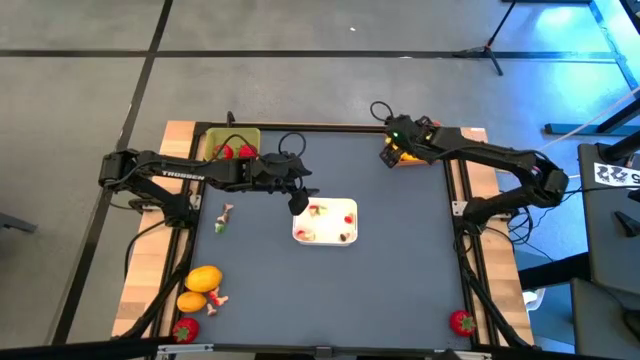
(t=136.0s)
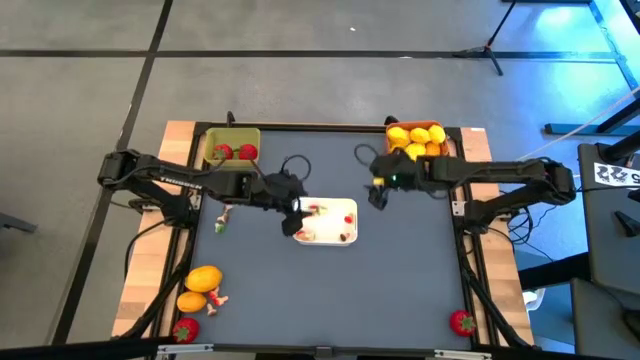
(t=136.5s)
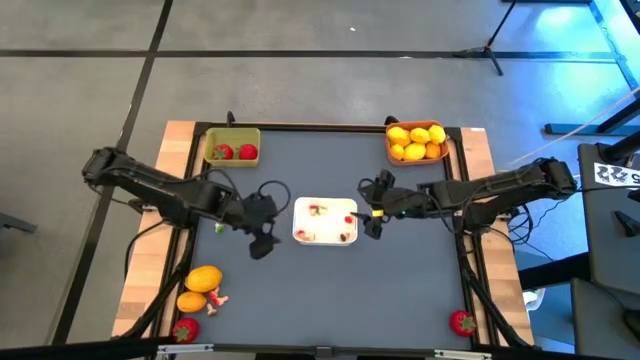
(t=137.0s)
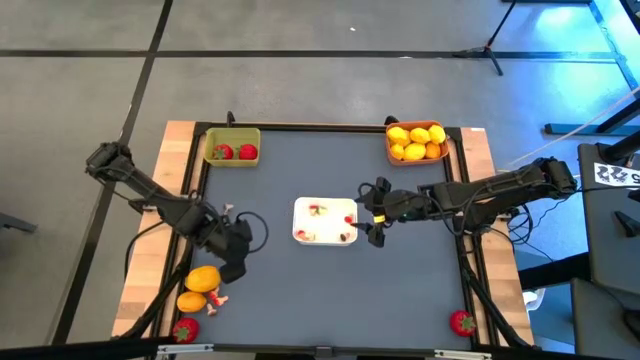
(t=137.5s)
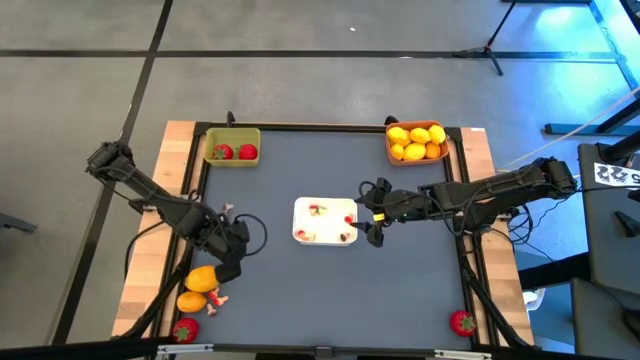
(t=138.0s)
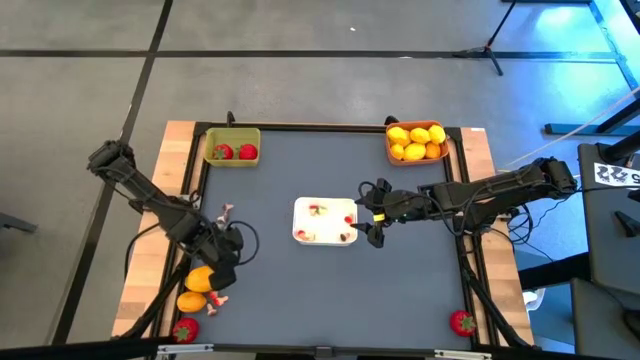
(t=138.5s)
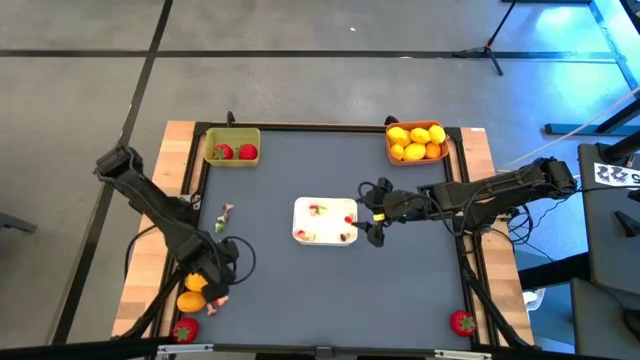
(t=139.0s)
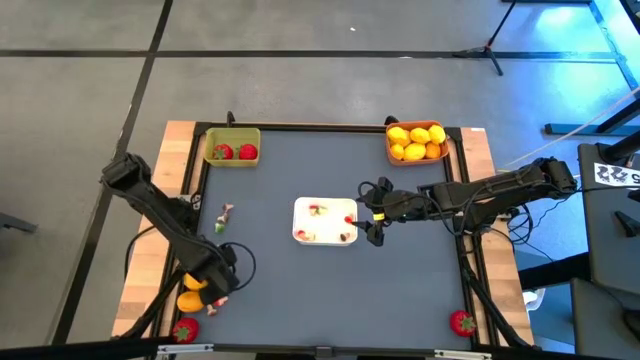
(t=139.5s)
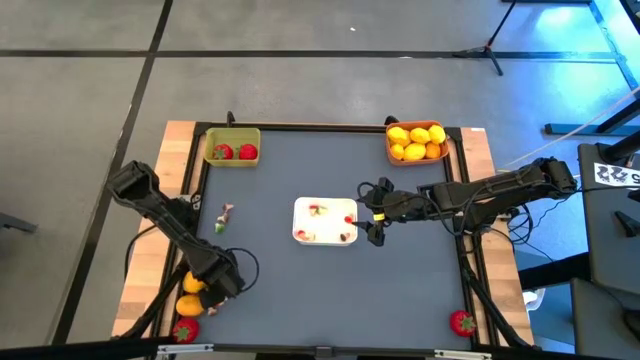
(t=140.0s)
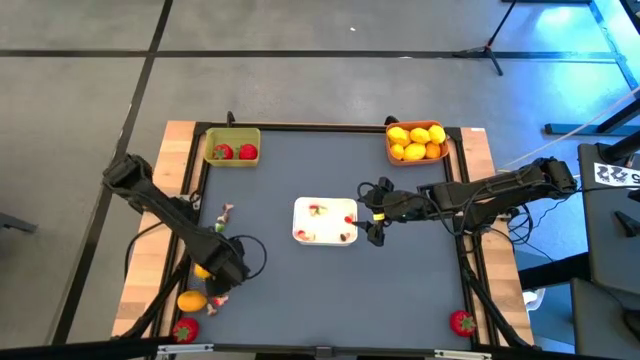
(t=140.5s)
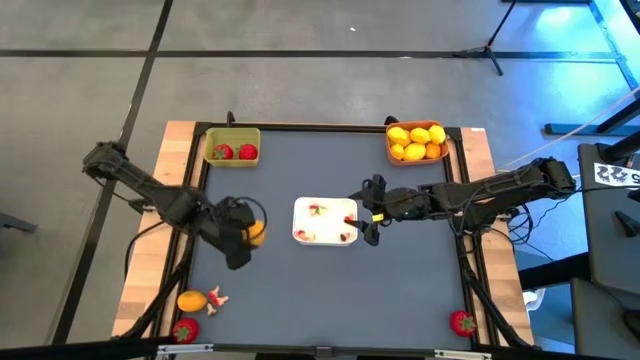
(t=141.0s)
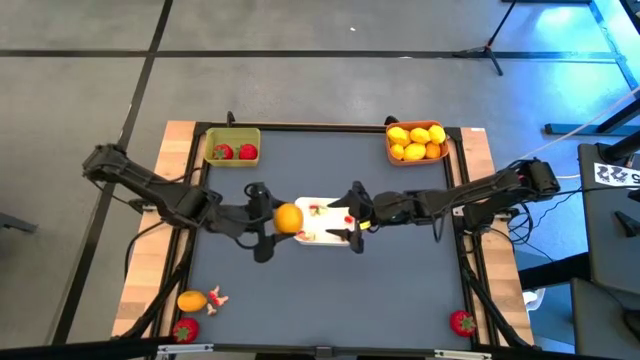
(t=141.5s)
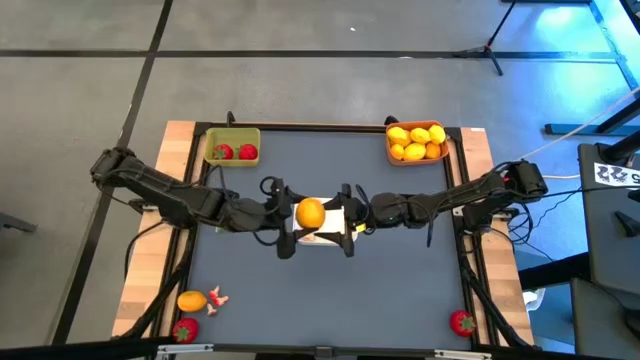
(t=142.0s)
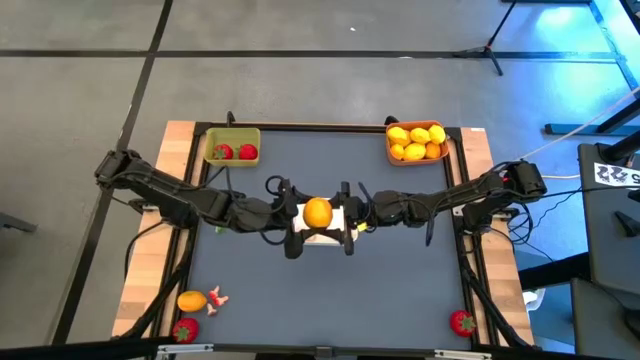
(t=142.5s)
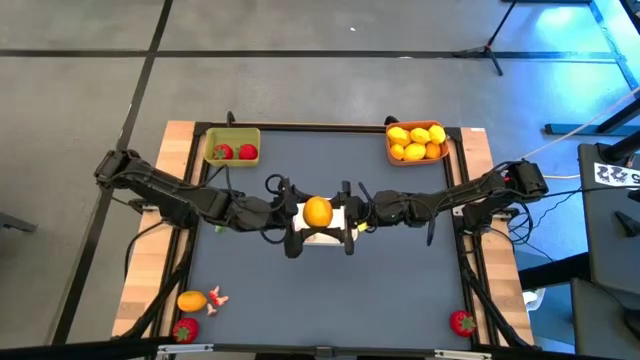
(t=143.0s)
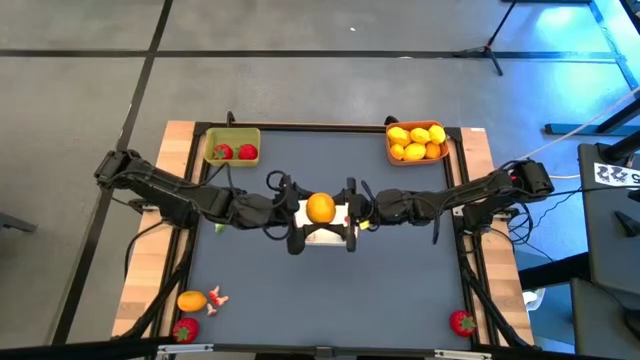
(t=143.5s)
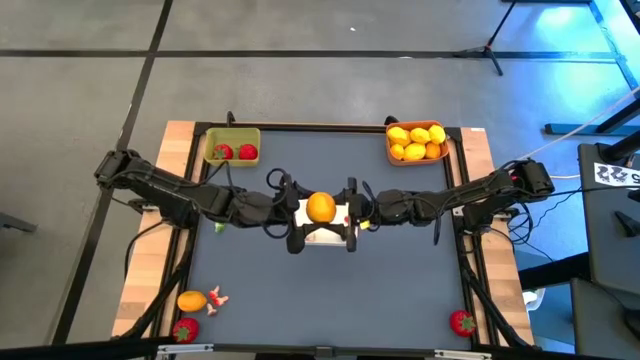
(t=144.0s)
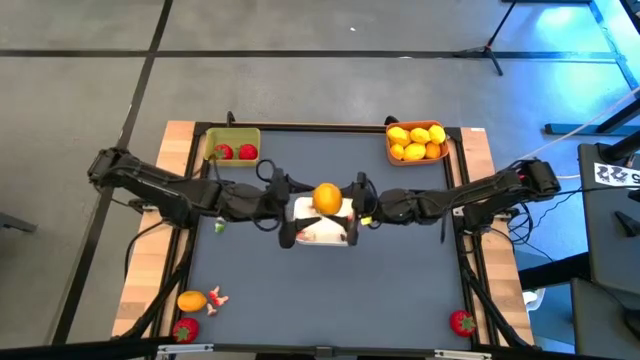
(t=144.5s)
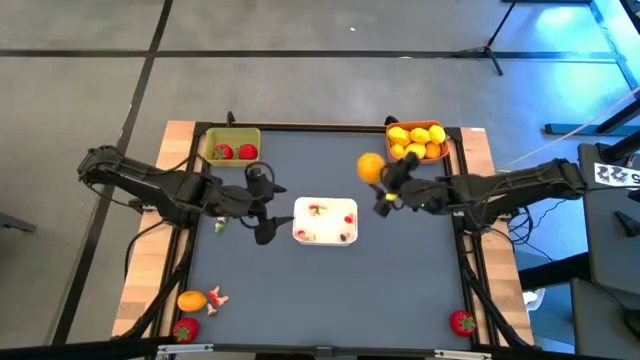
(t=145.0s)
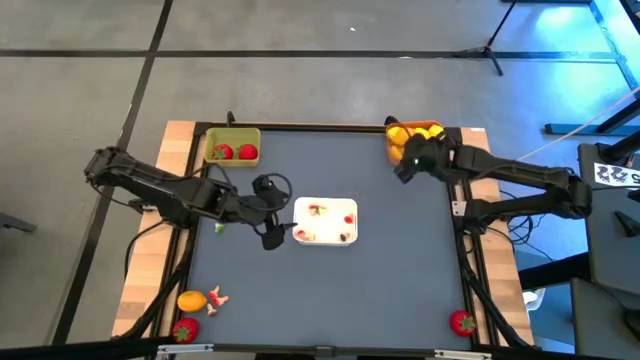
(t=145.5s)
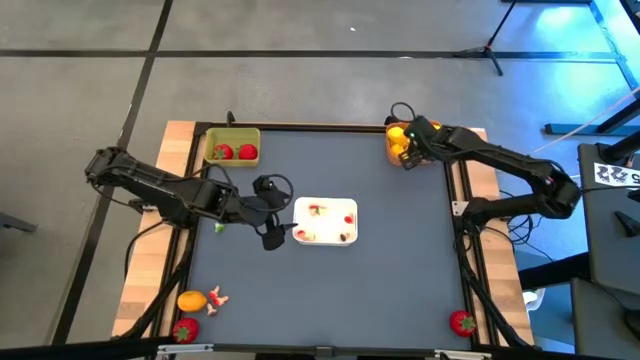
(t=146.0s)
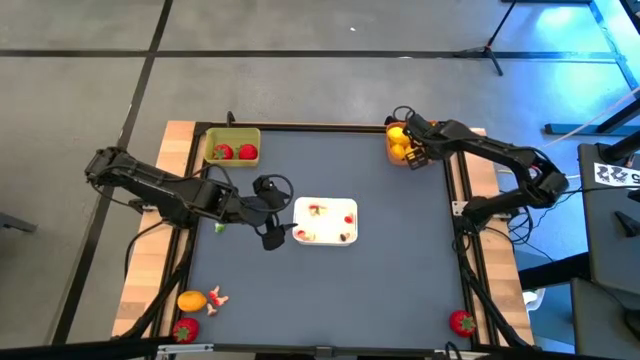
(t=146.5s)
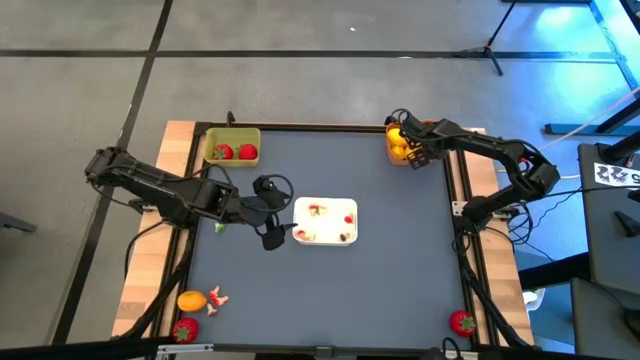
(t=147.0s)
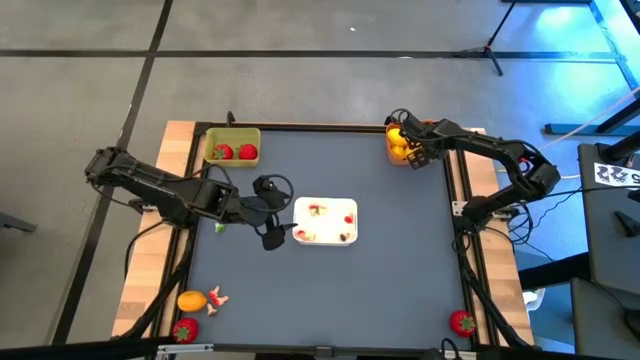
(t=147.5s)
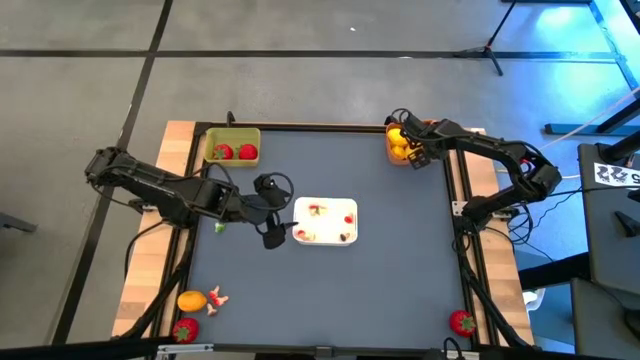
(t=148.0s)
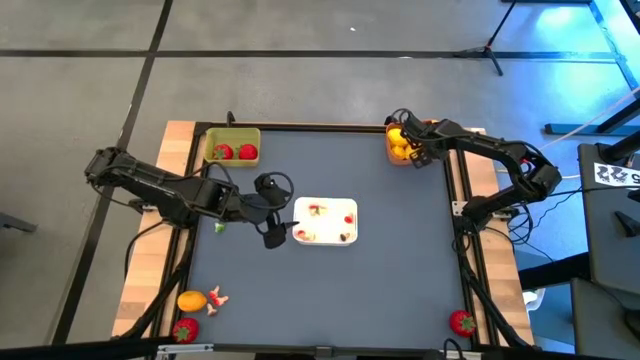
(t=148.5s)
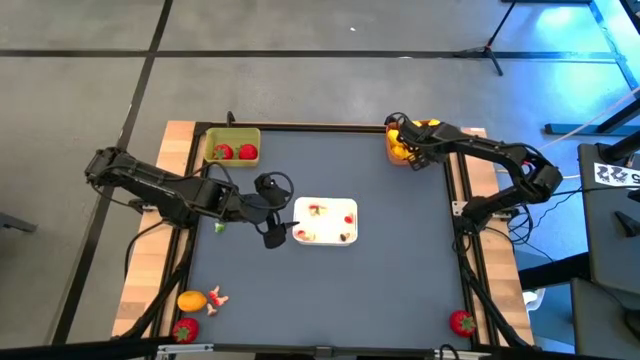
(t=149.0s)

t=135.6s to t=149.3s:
Task: Sort produce into baskets
Put the yellow lemon into the orange bin

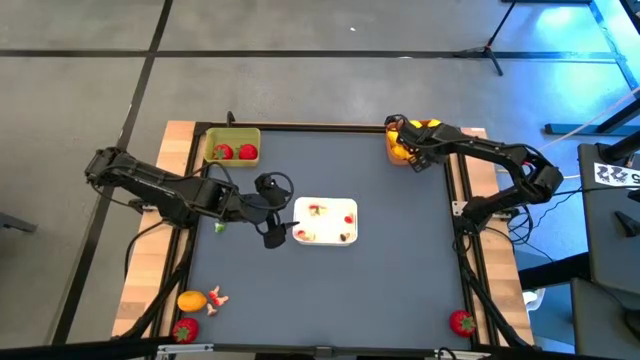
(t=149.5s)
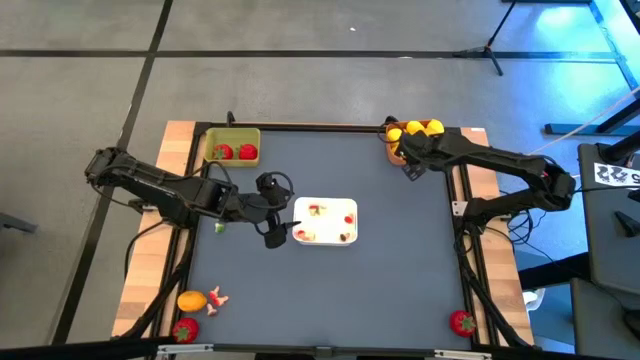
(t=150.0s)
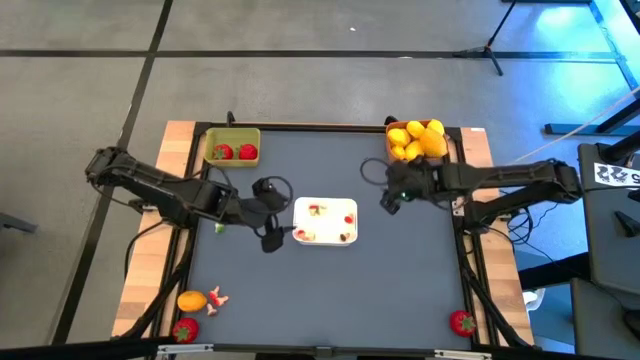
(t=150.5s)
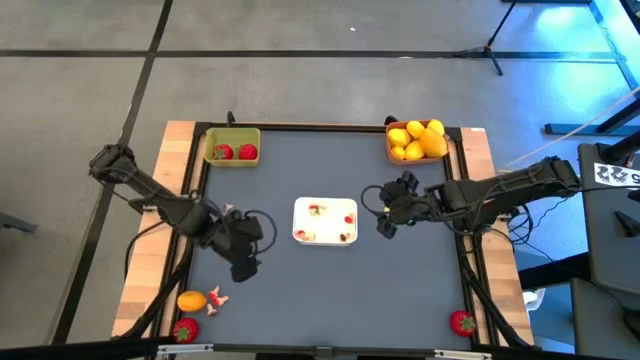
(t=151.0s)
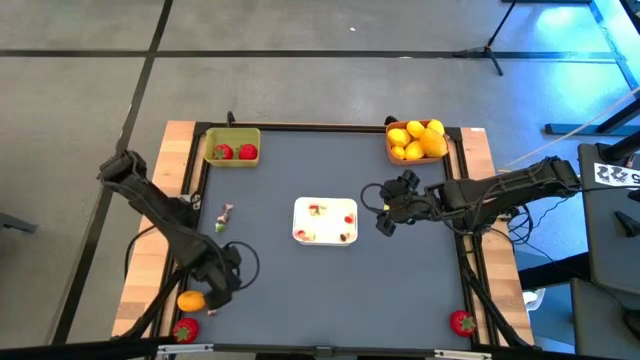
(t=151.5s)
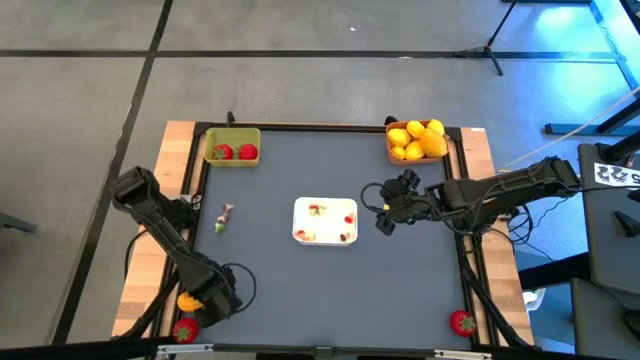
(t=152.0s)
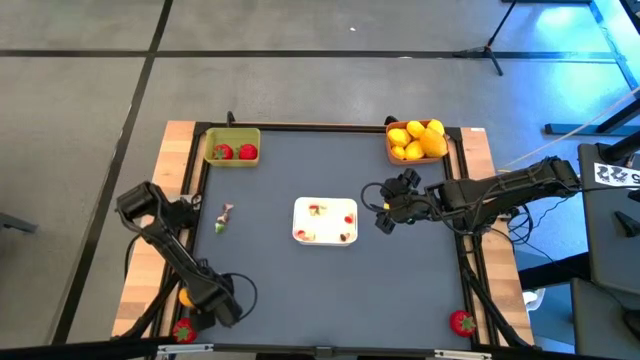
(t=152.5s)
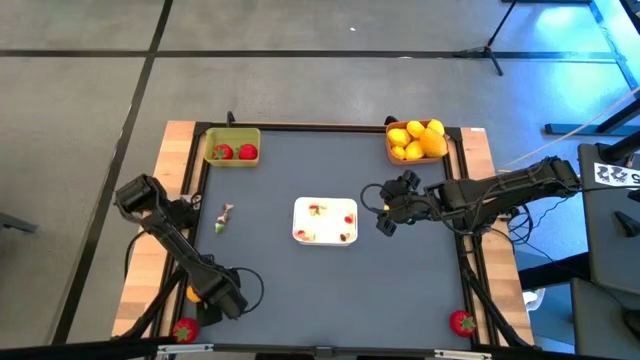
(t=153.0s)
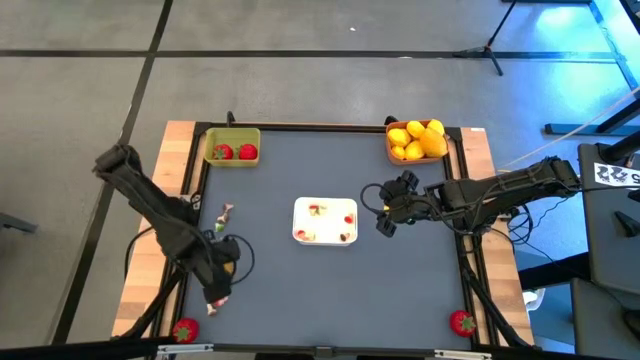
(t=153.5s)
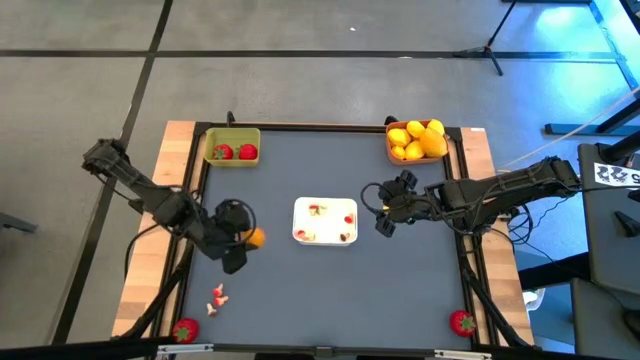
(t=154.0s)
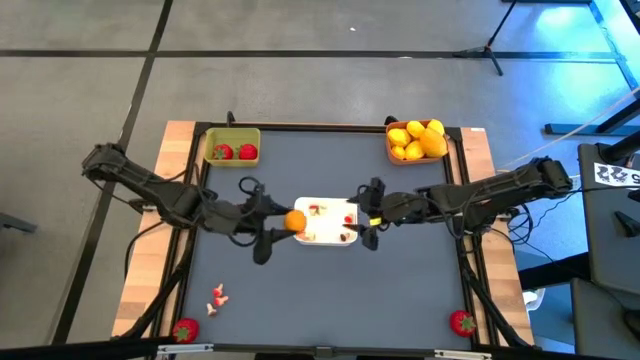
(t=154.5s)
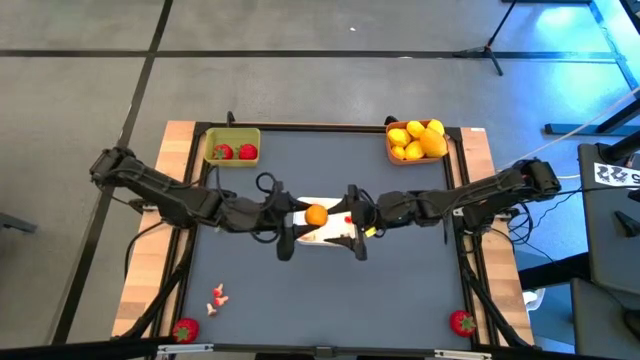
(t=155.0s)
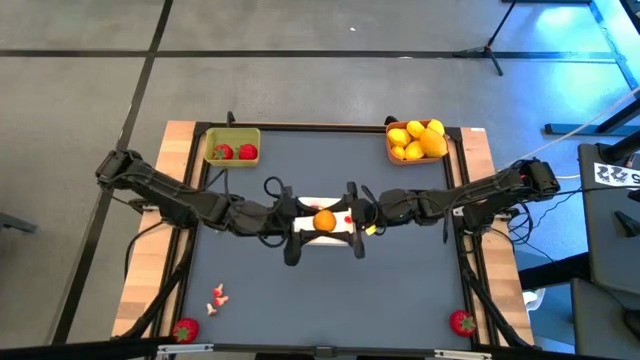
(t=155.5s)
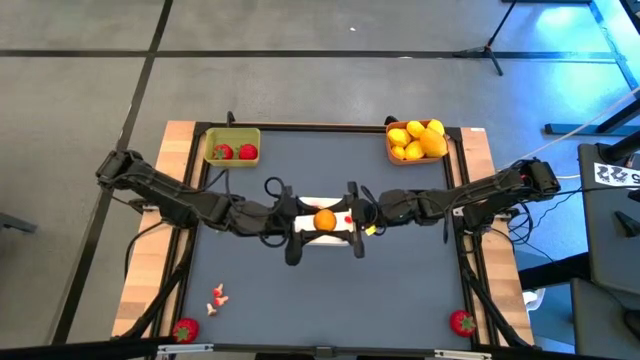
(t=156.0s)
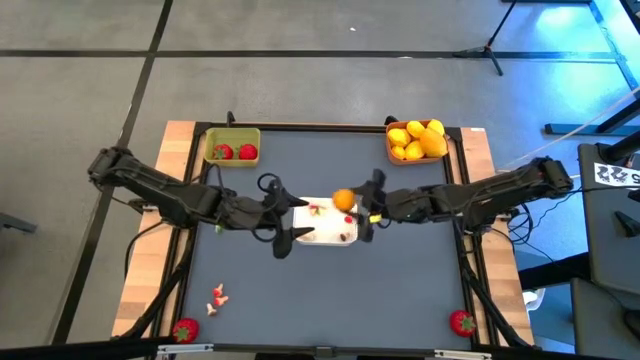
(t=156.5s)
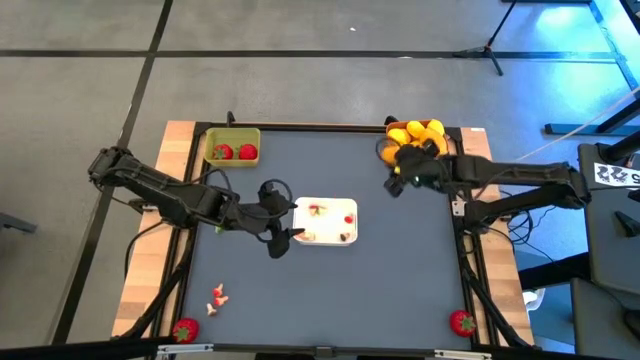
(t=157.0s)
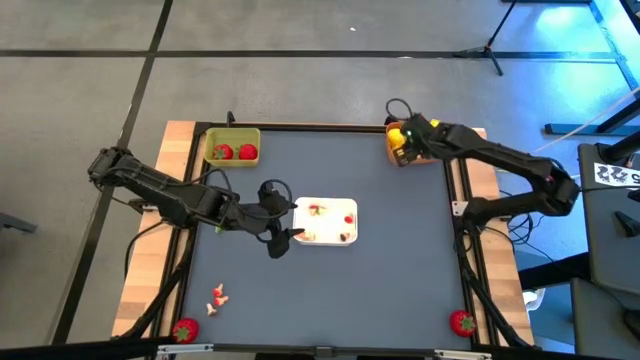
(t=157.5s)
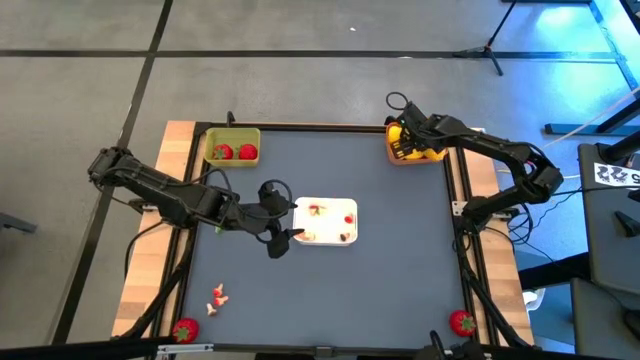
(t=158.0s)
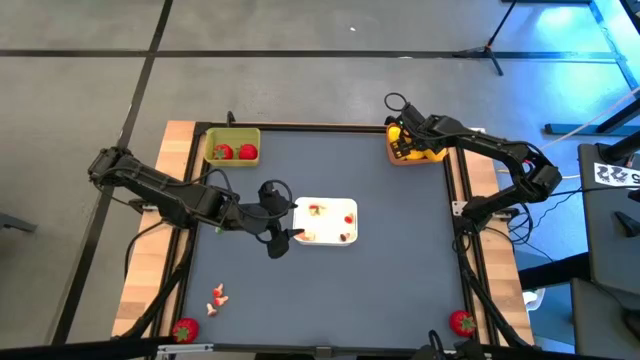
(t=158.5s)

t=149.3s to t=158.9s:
Put the yellow lemon into the orange bin
